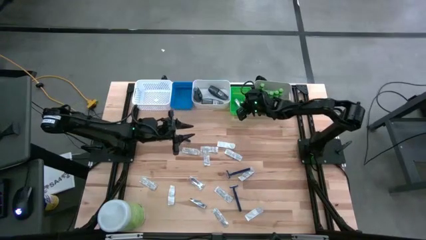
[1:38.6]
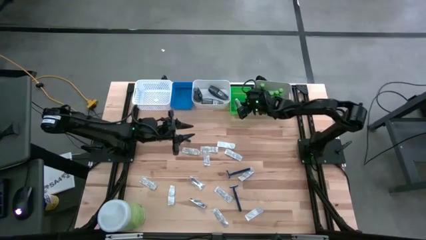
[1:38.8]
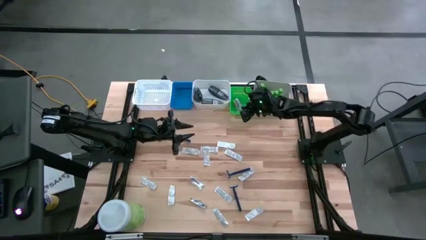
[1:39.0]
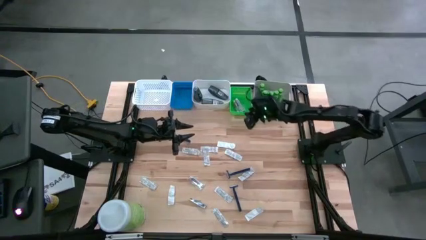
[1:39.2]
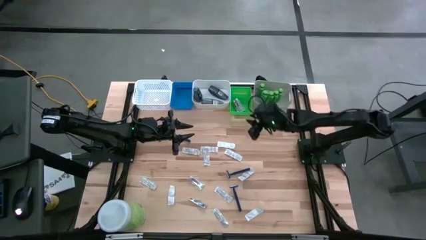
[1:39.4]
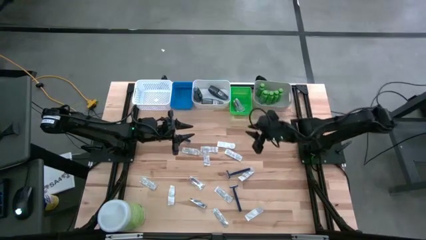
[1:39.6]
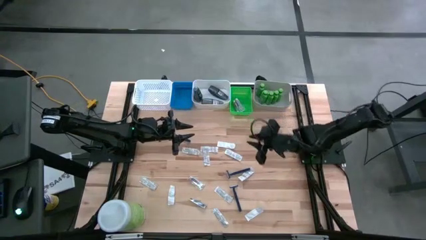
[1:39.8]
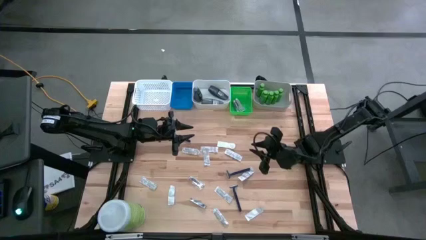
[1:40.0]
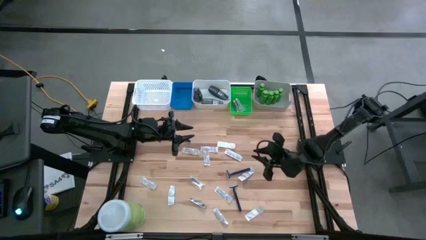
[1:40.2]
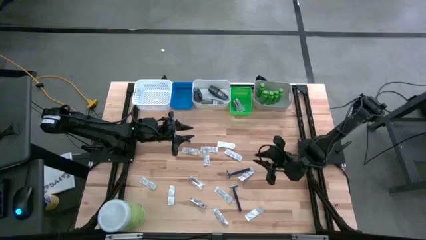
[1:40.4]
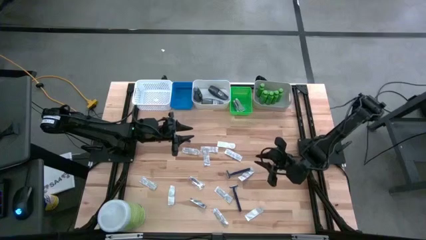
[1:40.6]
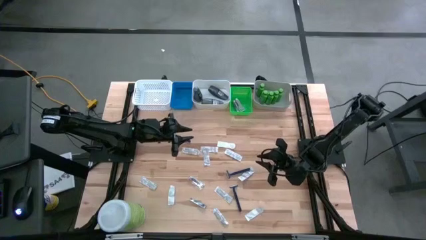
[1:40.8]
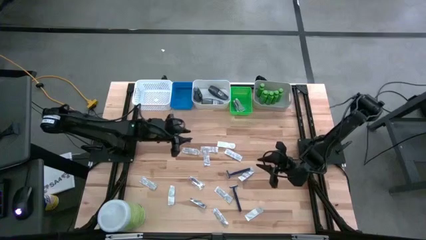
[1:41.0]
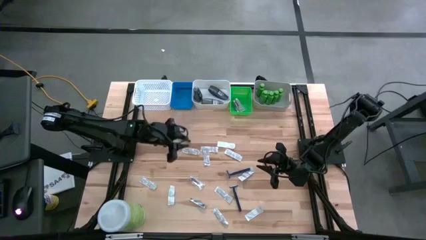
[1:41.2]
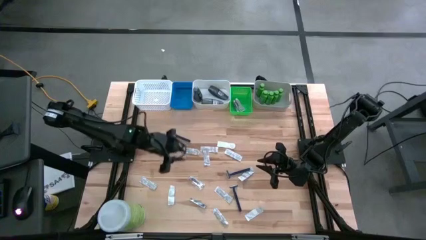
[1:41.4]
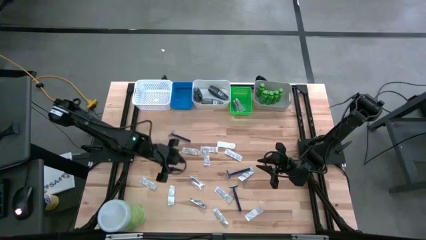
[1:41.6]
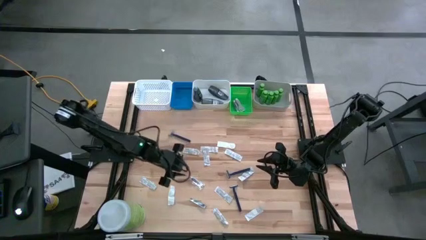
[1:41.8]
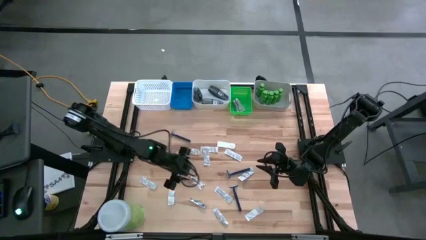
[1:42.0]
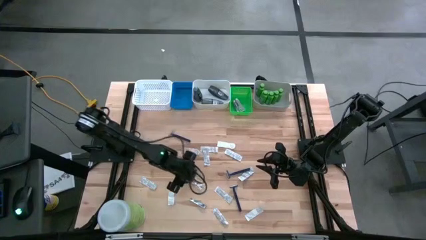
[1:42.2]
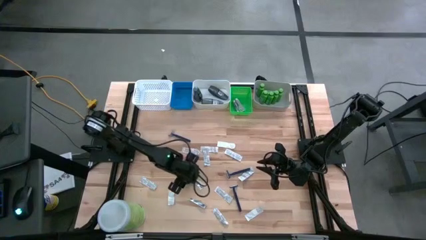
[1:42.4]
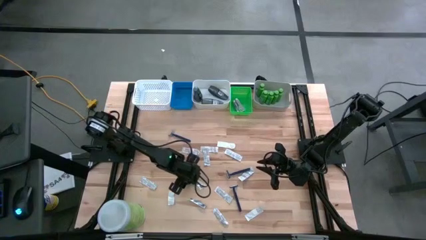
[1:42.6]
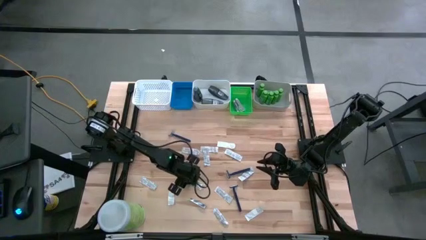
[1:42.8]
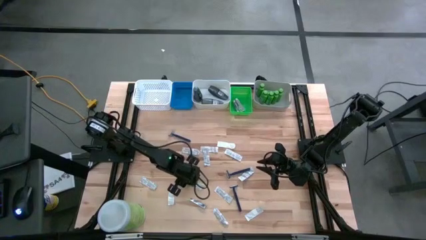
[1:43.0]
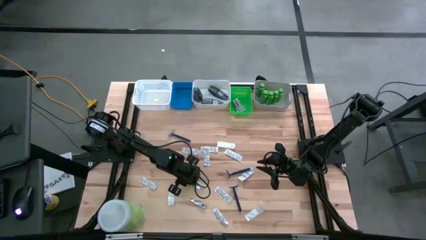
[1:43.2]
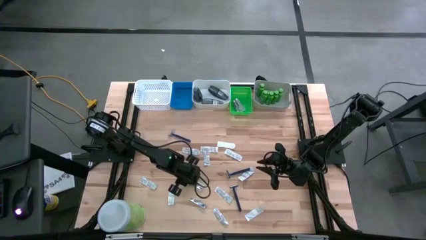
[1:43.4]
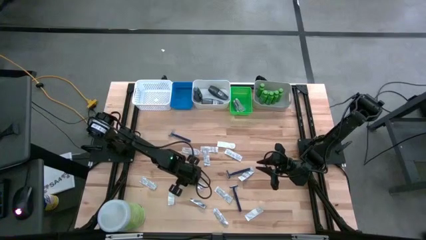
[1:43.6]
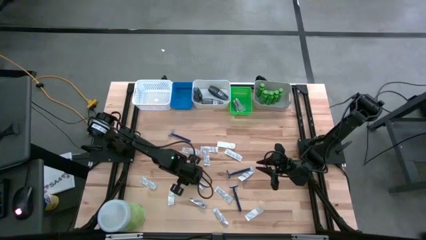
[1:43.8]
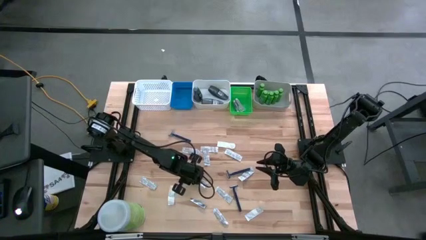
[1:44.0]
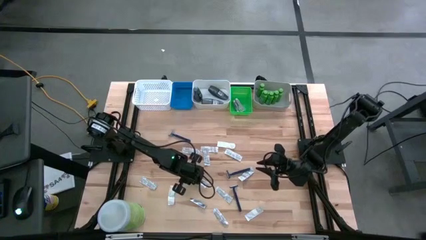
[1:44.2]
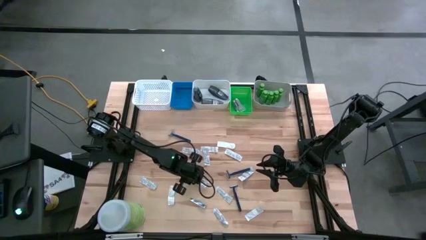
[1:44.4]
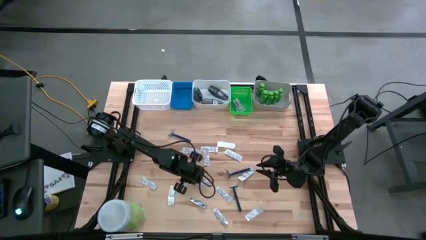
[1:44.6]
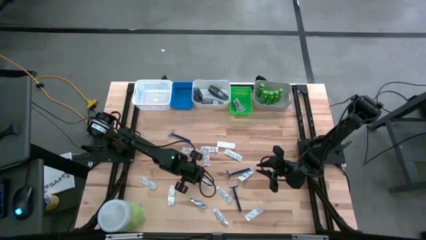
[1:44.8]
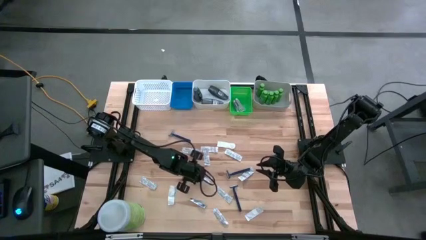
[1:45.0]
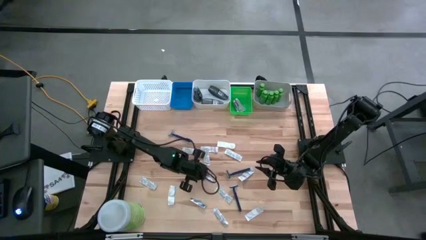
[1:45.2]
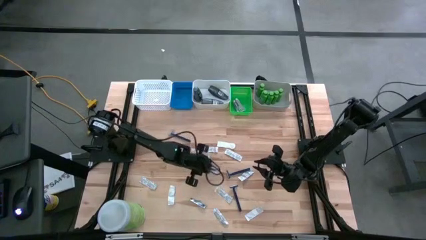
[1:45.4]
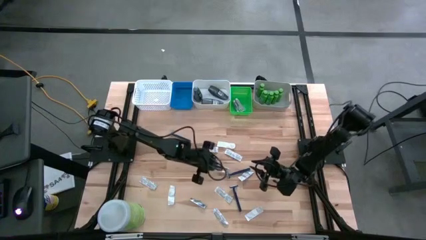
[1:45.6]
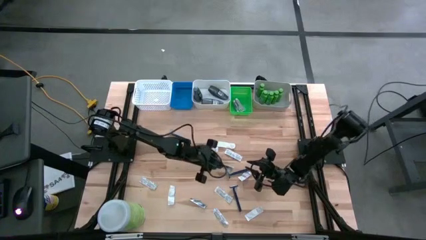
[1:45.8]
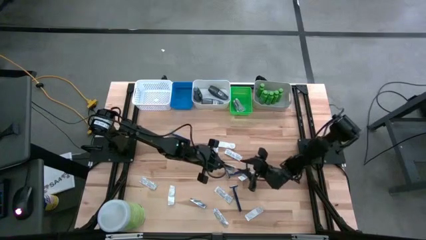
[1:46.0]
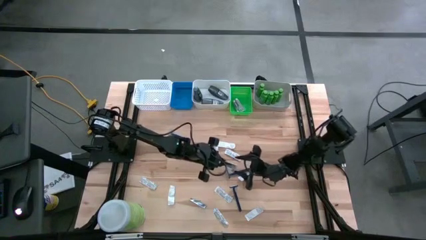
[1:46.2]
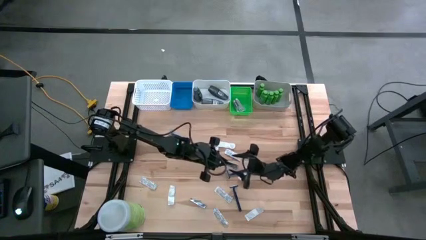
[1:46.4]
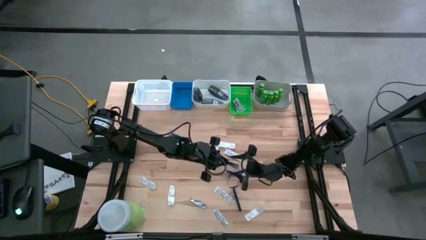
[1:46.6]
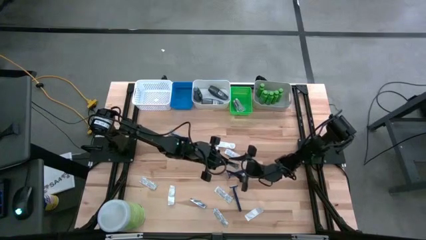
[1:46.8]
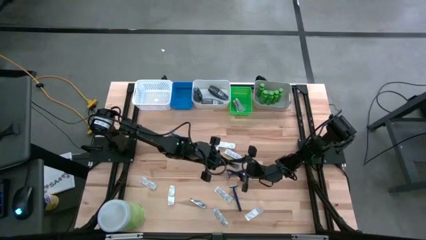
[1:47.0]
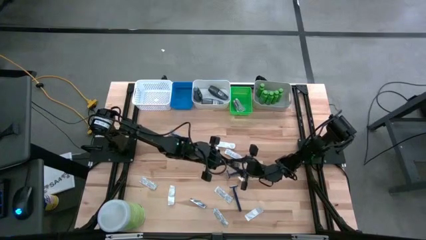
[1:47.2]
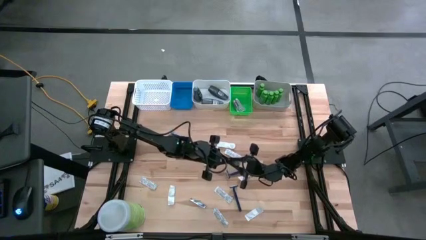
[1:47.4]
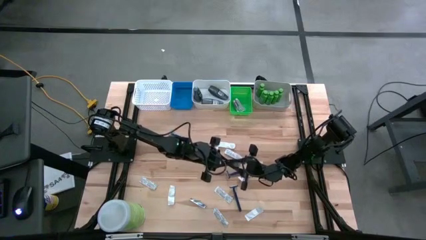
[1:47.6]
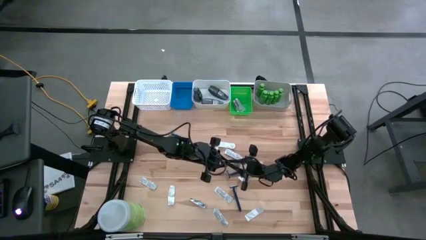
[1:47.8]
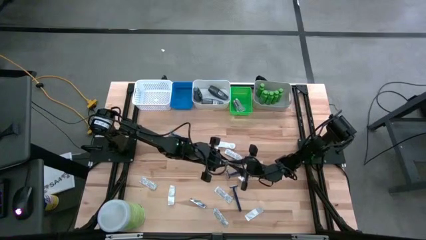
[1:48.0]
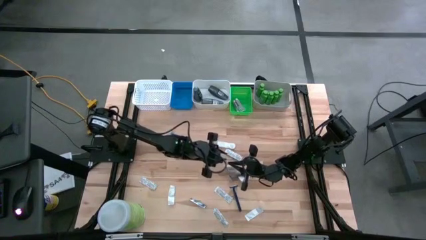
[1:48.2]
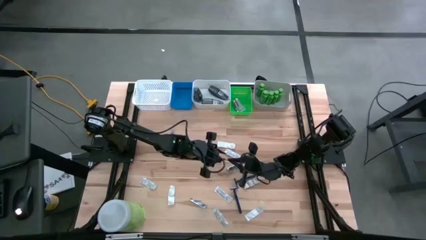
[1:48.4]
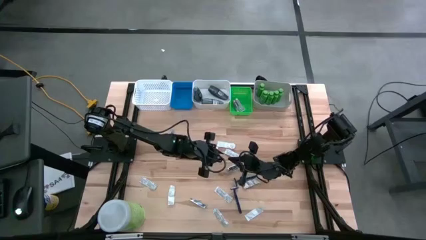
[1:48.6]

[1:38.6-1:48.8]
Task: Pick & Place Travel size toiletries
Put the nail cutter into the green bin

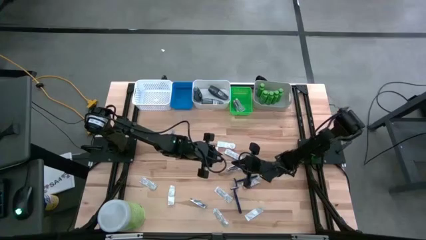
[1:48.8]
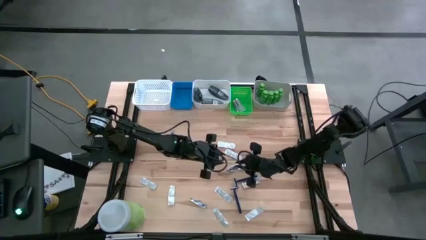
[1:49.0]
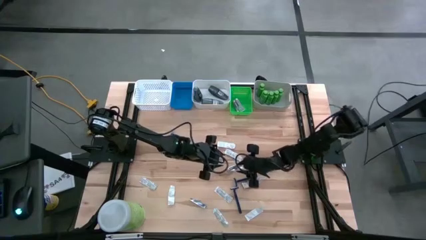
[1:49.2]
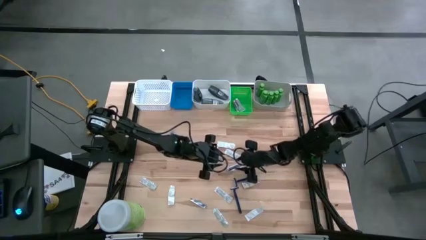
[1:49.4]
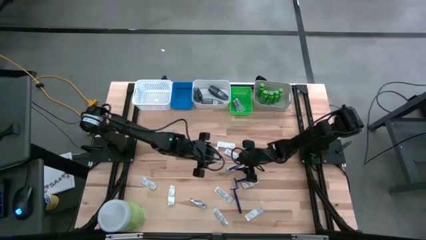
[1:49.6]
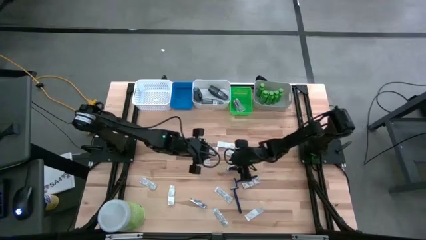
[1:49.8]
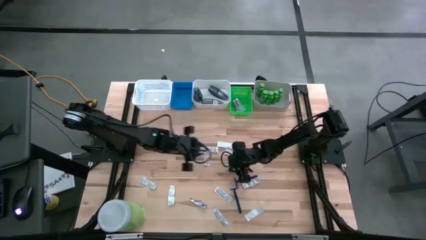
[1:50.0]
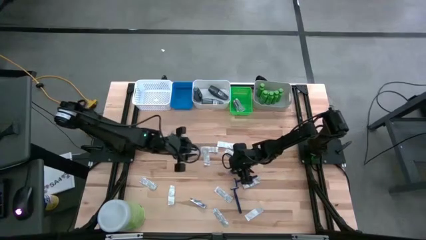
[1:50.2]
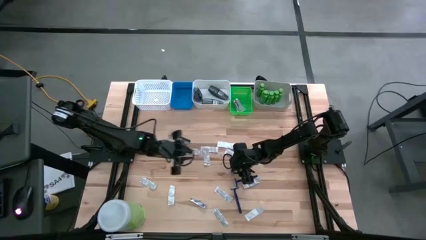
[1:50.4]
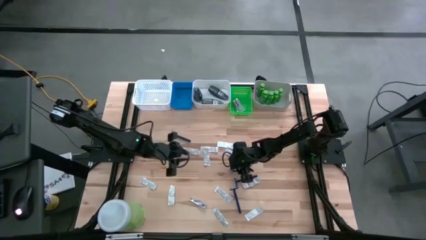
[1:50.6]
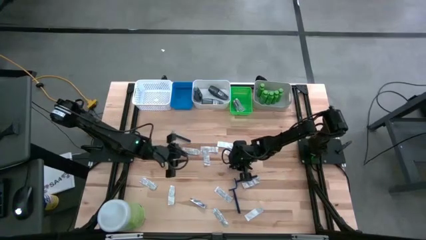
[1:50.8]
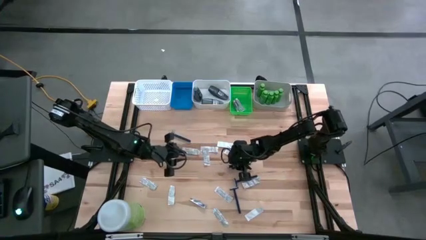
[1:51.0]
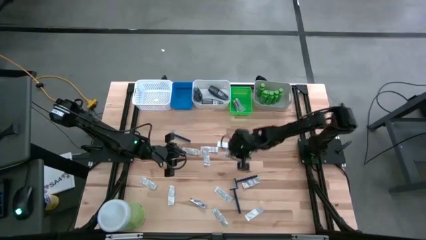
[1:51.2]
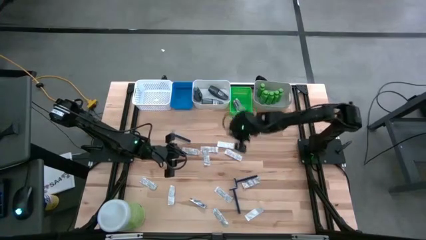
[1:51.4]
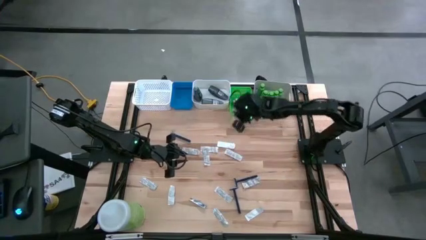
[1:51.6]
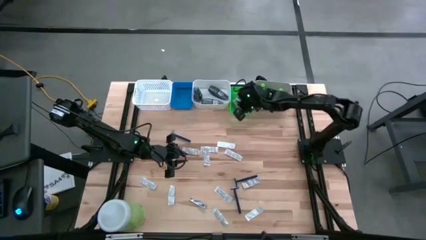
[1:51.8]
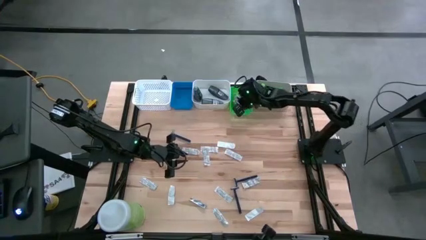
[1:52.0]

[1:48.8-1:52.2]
Put the nail cutter into the green bin

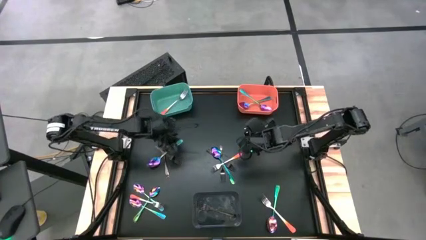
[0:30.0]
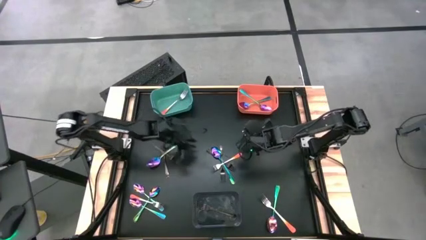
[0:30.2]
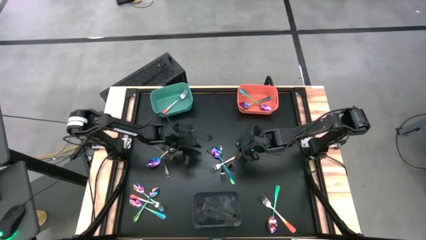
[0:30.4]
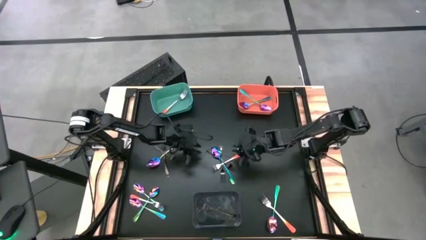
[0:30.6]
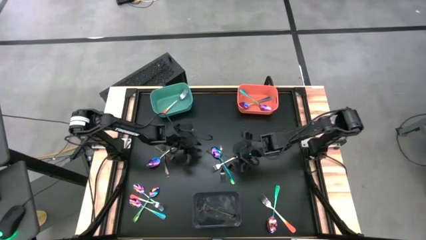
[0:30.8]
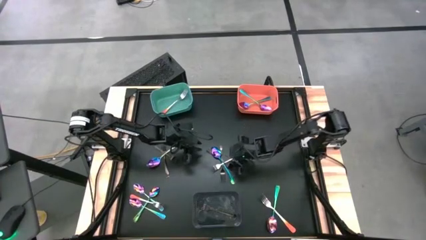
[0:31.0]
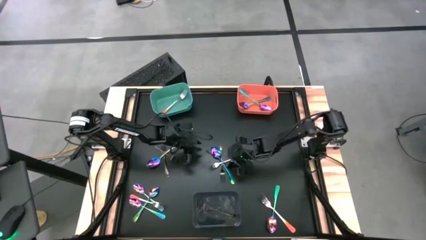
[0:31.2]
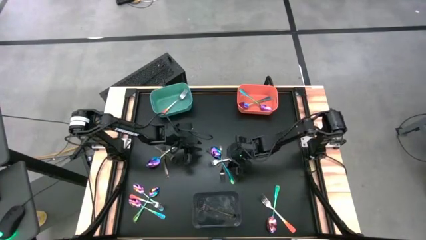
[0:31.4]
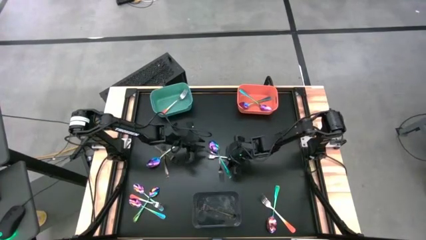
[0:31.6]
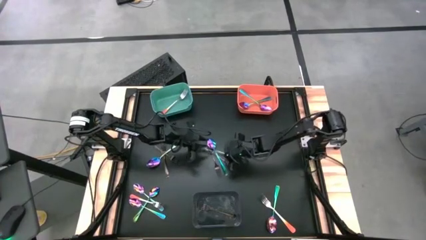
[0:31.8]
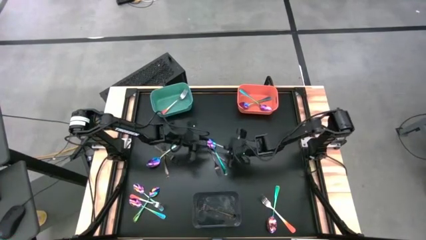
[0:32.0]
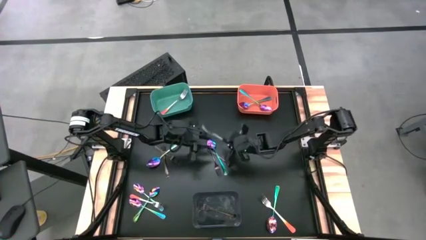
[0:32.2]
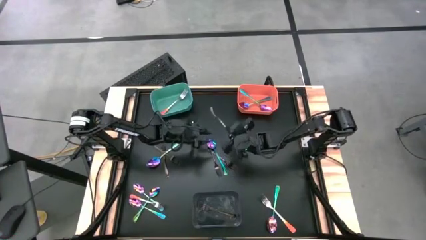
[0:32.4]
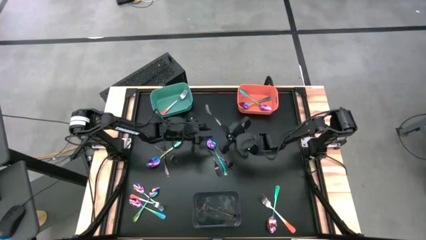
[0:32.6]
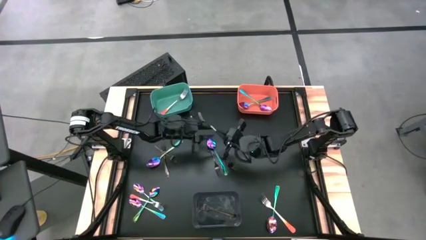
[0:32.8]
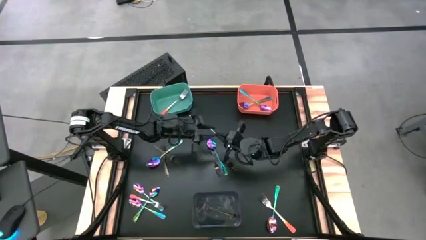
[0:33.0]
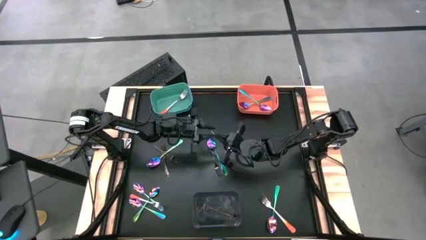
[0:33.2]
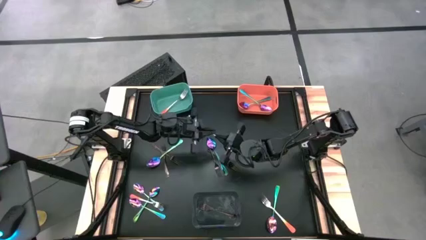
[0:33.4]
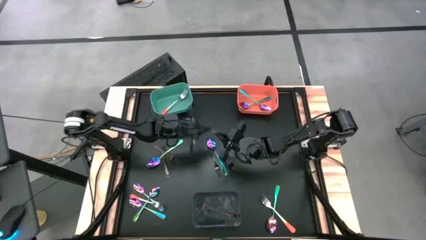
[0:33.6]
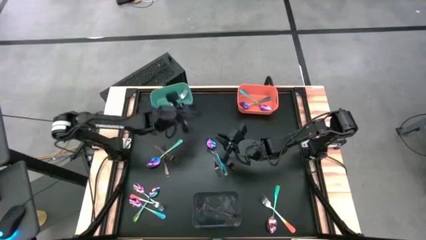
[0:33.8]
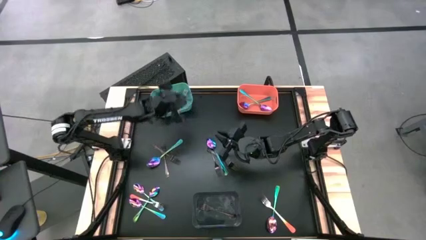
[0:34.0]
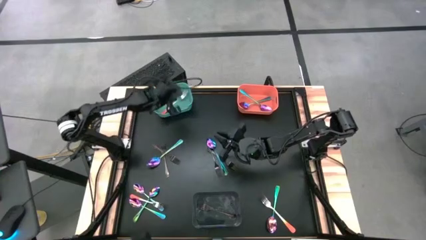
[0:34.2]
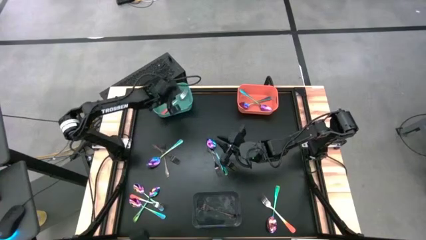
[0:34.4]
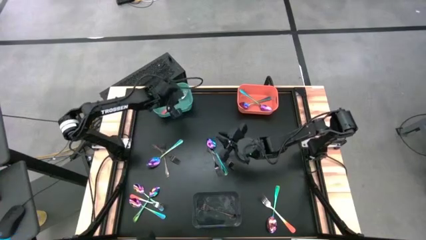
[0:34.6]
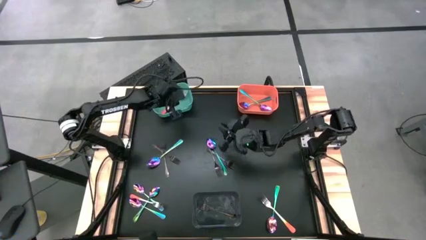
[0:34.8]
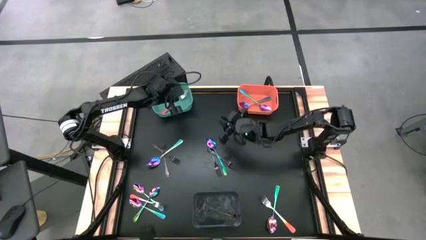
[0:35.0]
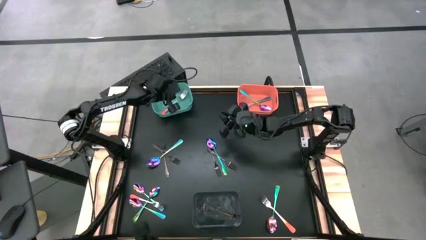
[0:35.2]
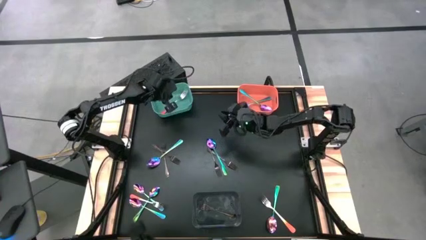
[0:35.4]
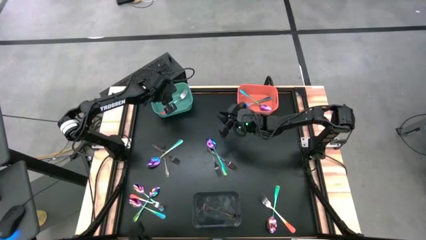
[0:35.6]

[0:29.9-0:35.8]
Task: Sort silverware by color (type)
Put the orange fork into the green bin
